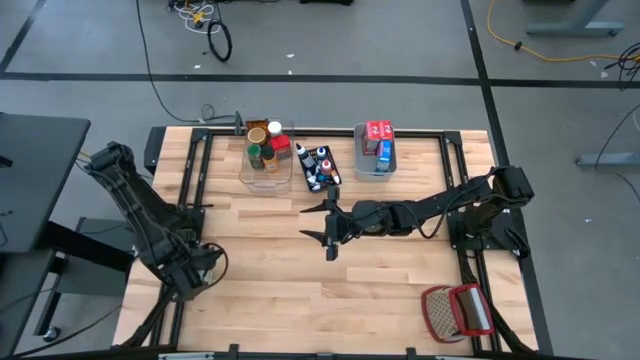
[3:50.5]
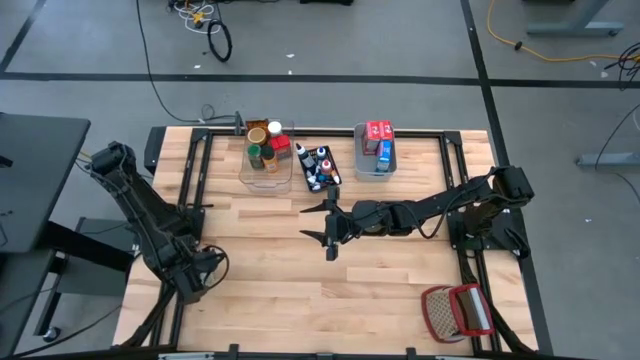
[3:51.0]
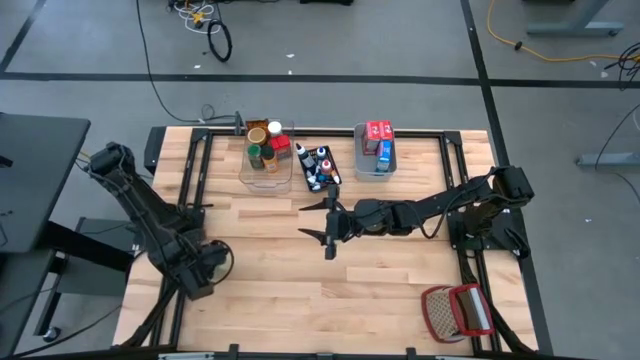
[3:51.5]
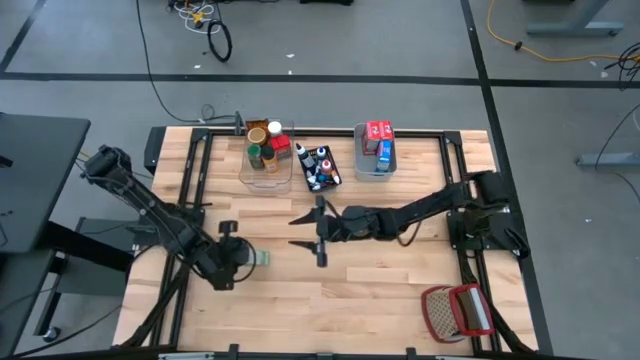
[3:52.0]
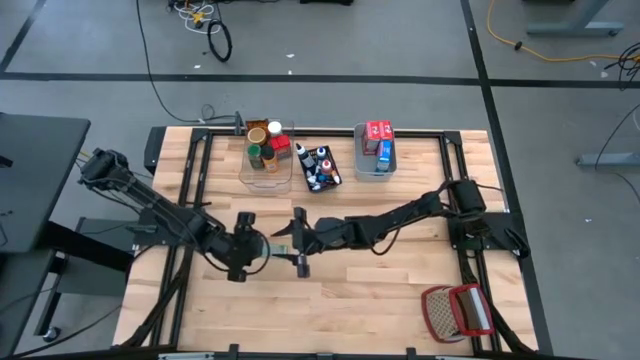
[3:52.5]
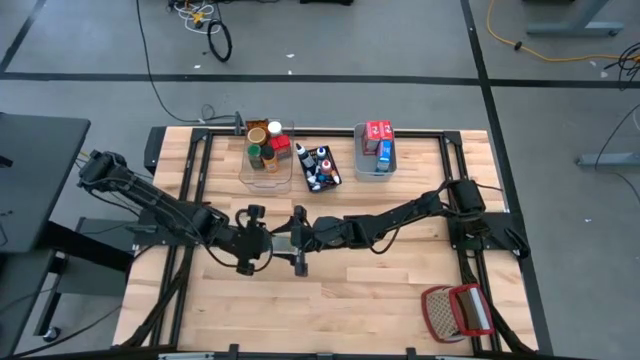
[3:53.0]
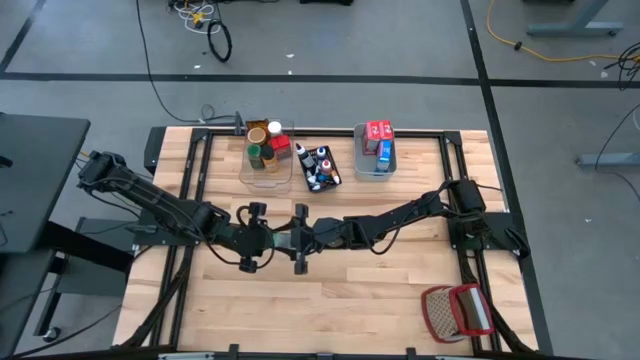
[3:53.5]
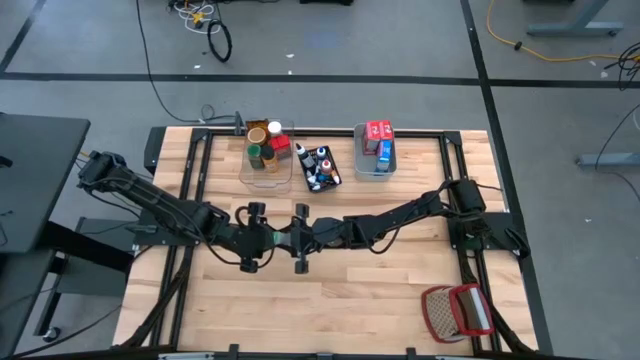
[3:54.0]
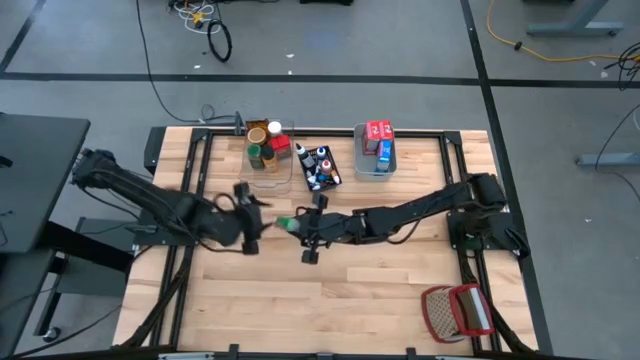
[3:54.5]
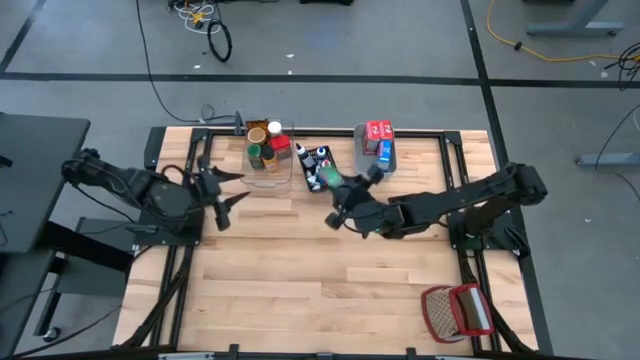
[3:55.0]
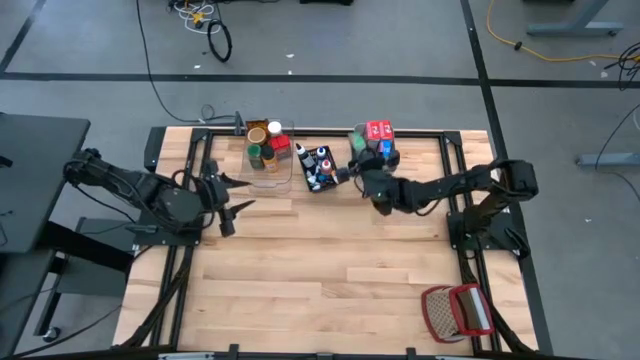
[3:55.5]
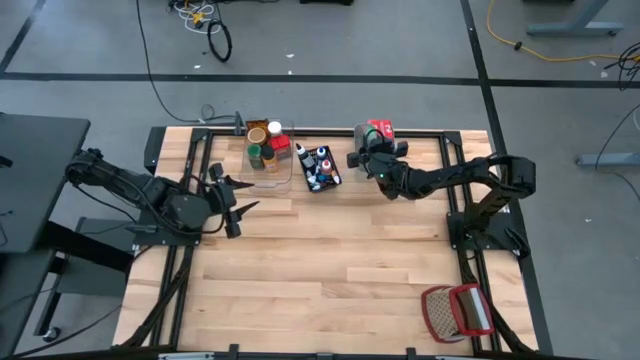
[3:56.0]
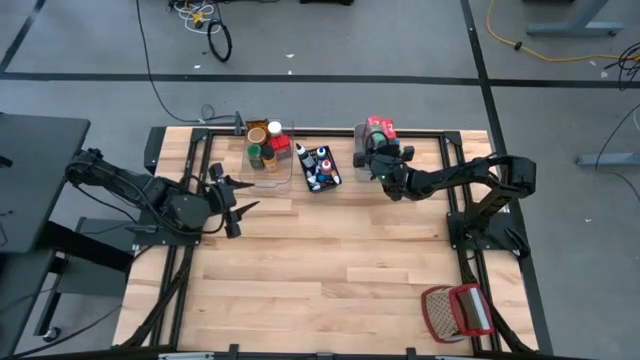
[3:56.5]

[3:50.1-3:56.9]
Task: Pick & Place Kitchen Items
Put the green cereal box into the gray bin

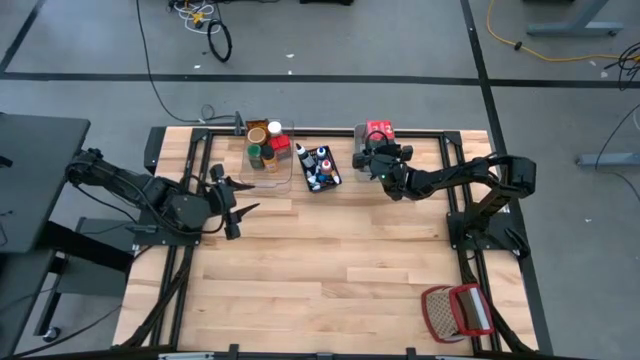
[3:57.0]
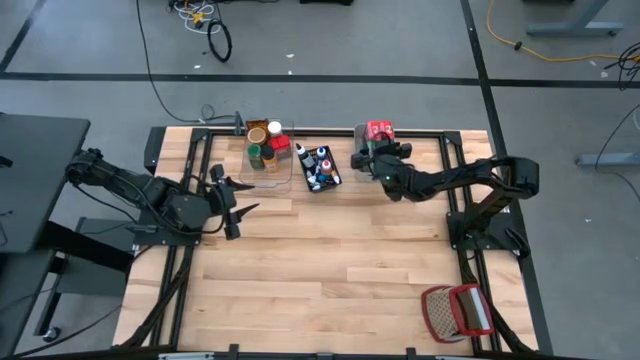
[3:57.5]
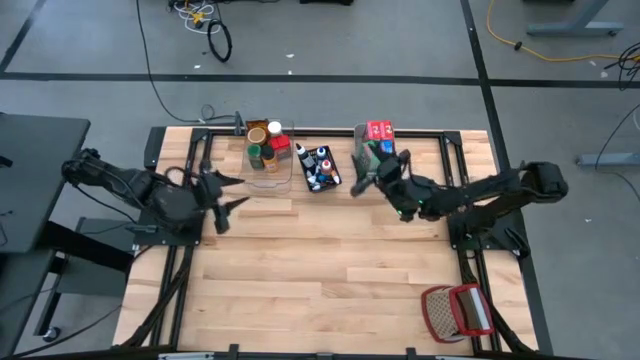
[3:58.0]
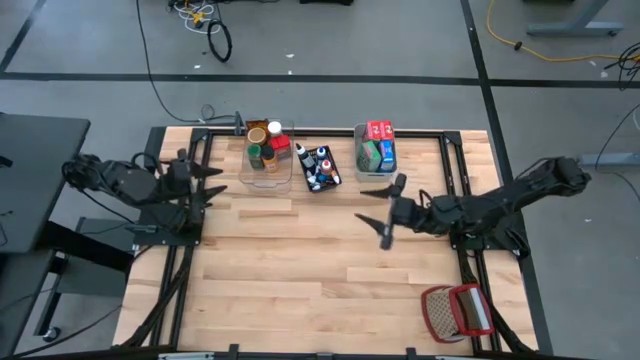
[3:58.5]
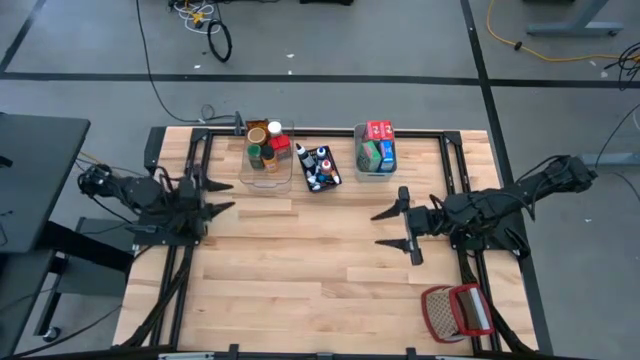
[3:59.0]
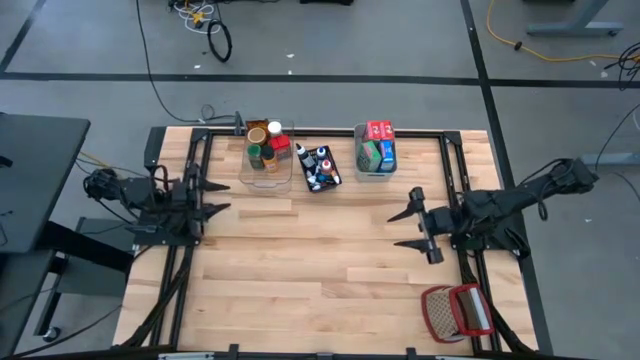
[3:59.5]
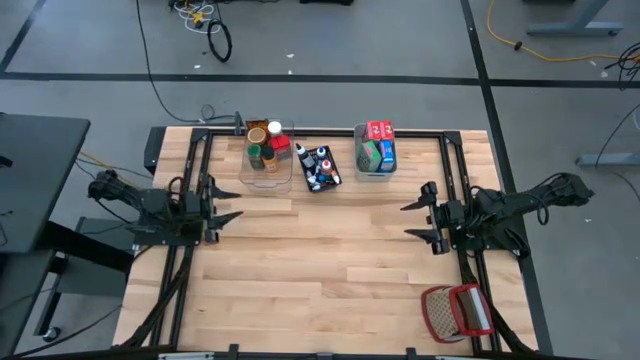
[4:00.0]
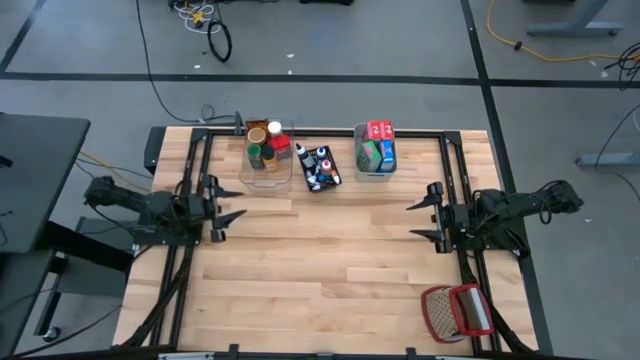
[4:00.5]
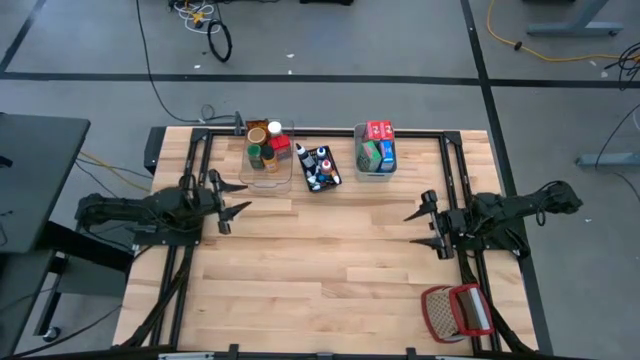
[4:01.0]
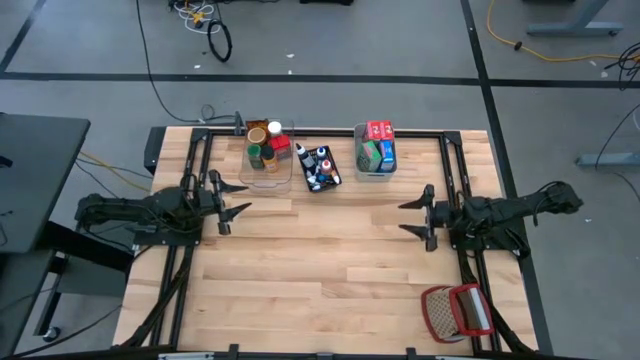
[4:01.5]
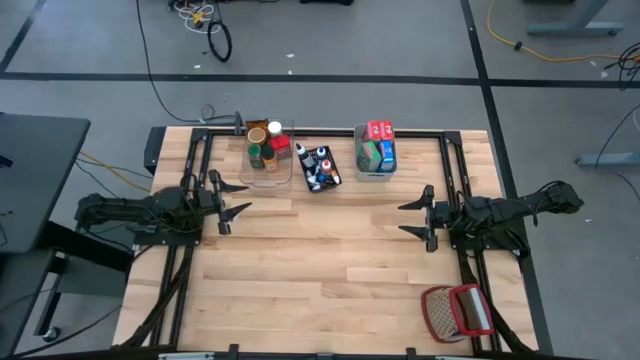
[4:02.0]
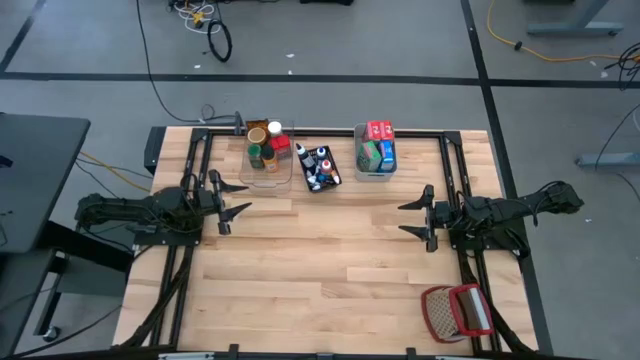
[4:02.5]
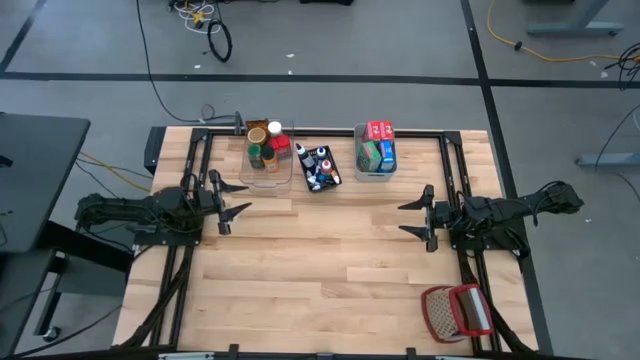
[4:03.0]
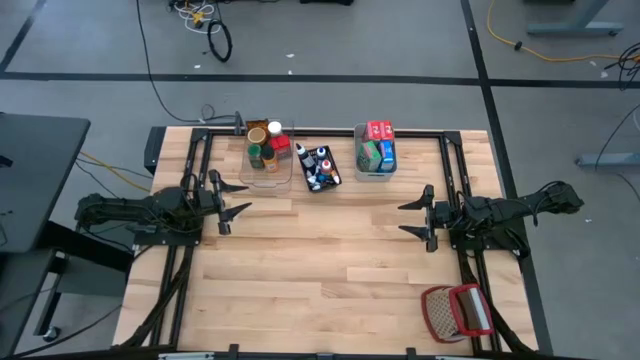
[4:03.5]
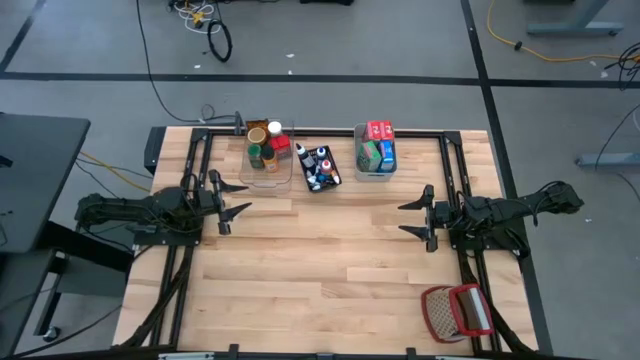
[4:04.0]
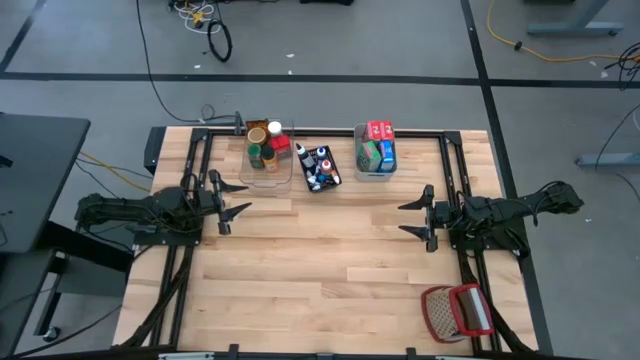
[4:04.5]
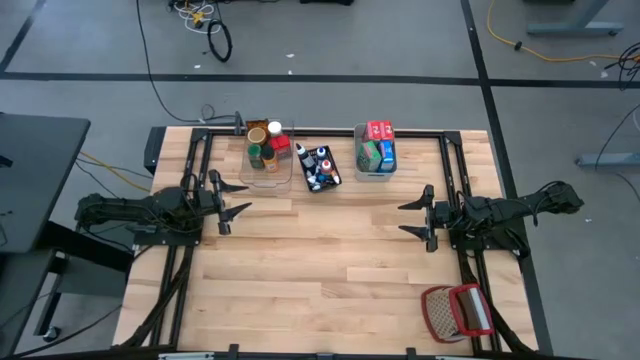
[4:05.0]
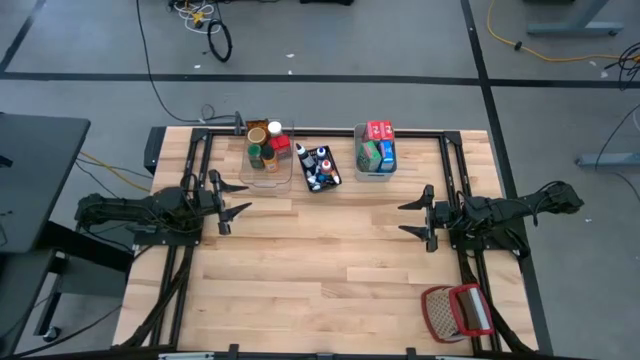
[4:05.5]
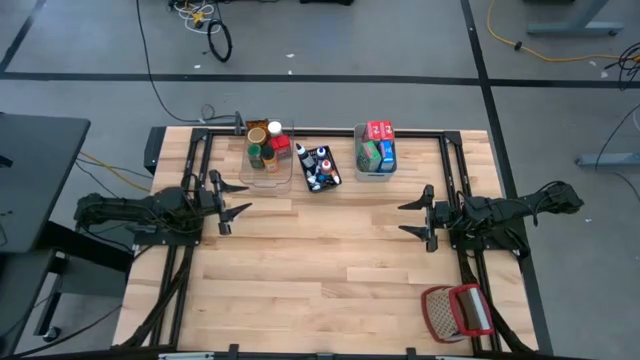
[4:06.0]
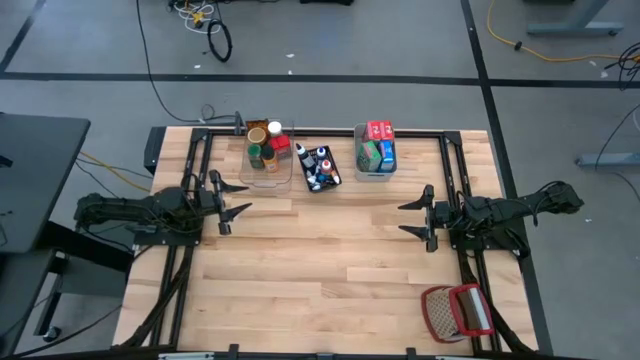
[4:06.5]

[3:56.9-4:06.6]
Return to Home Position

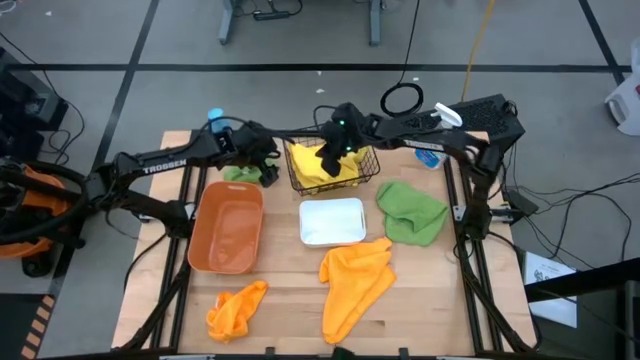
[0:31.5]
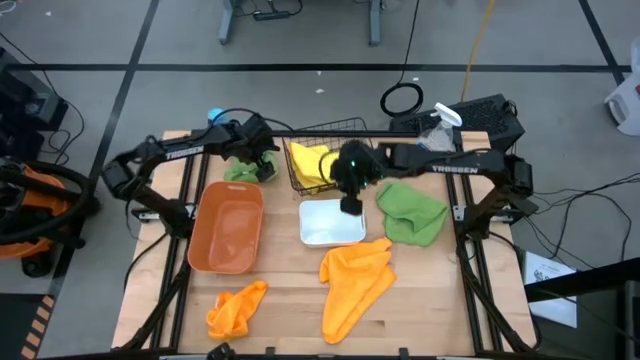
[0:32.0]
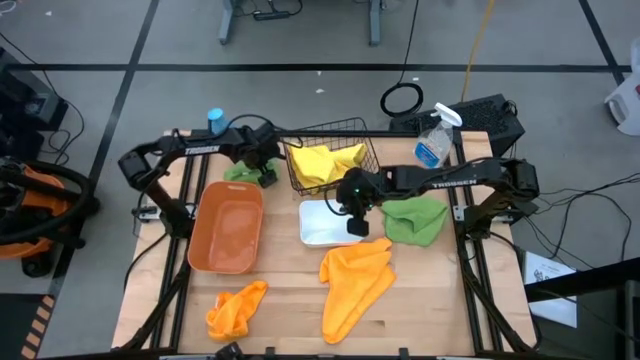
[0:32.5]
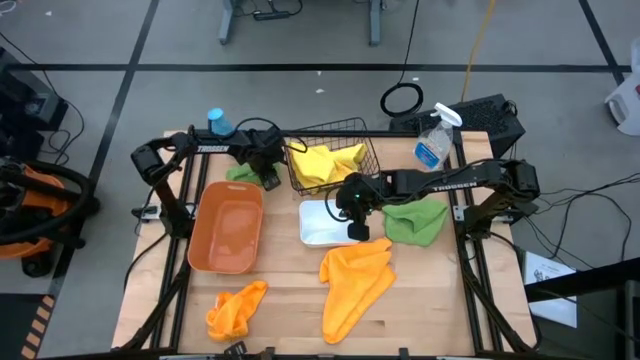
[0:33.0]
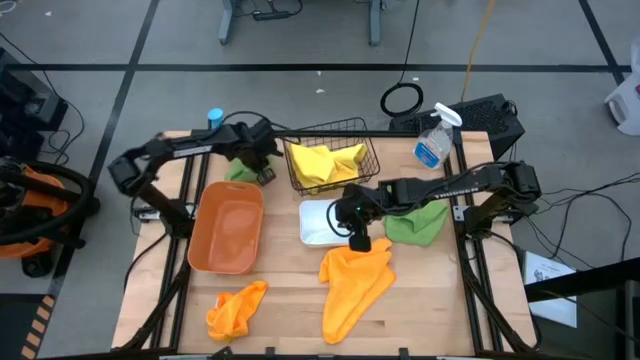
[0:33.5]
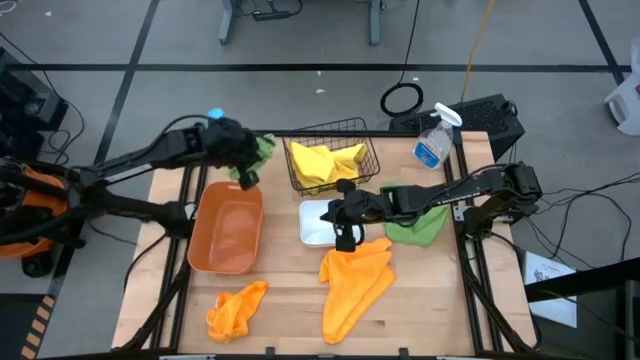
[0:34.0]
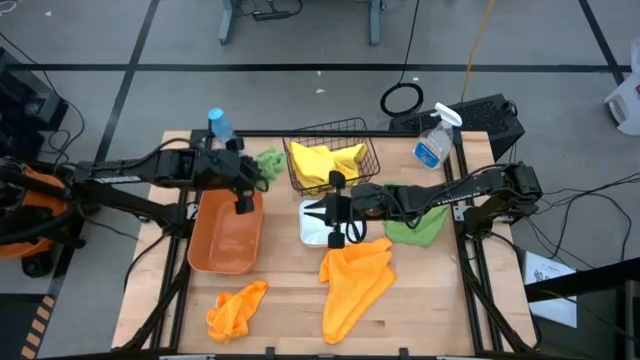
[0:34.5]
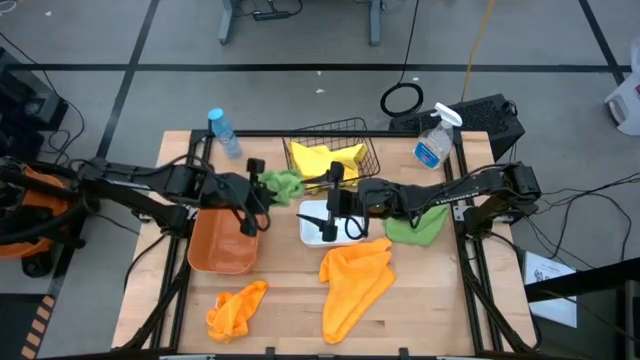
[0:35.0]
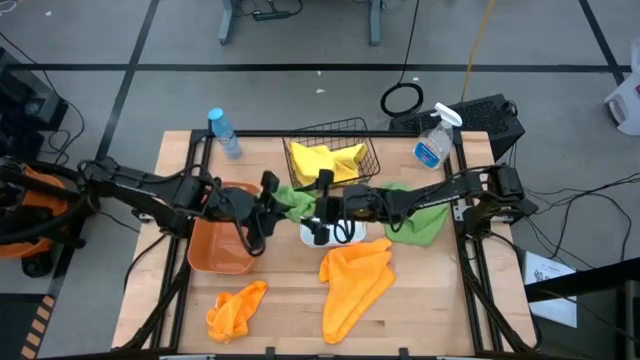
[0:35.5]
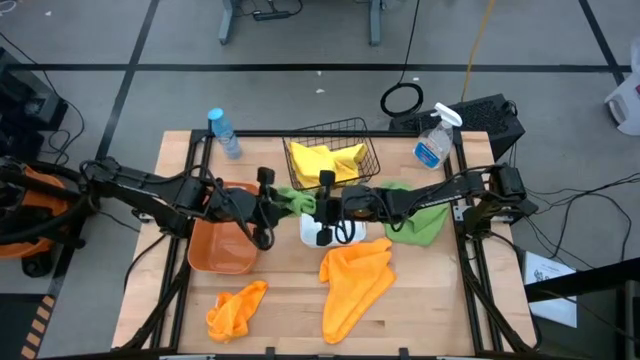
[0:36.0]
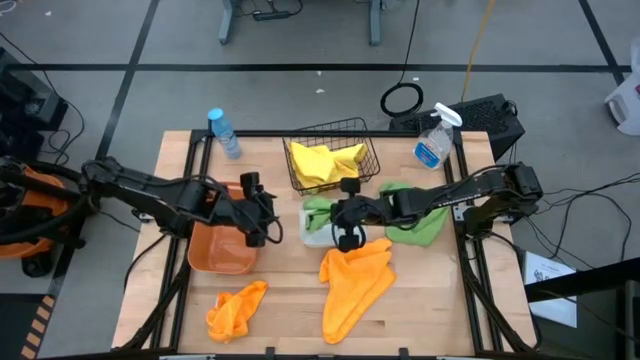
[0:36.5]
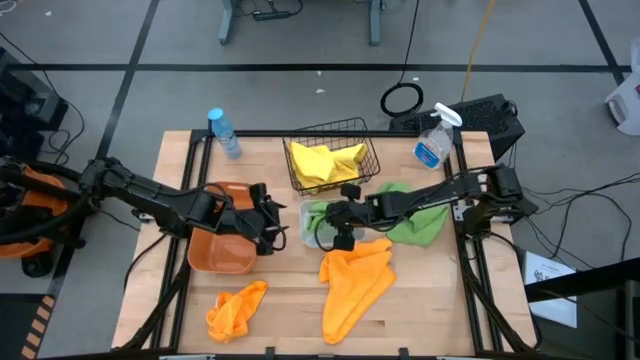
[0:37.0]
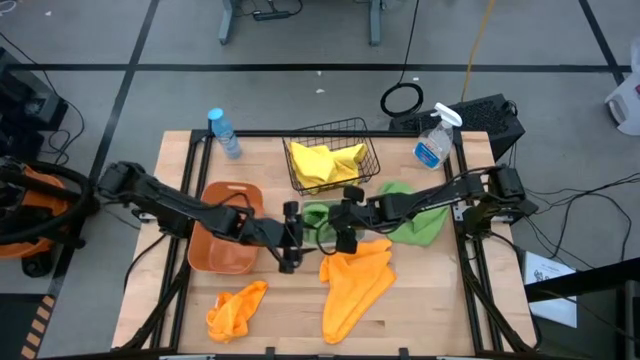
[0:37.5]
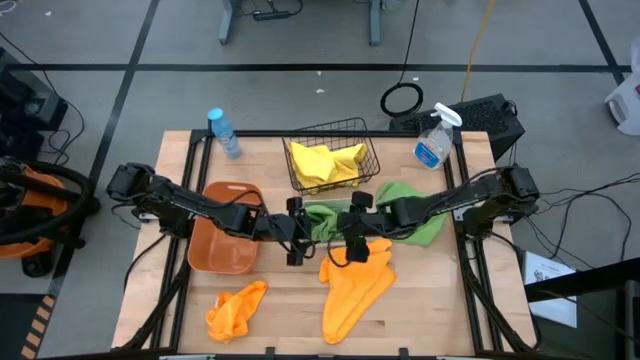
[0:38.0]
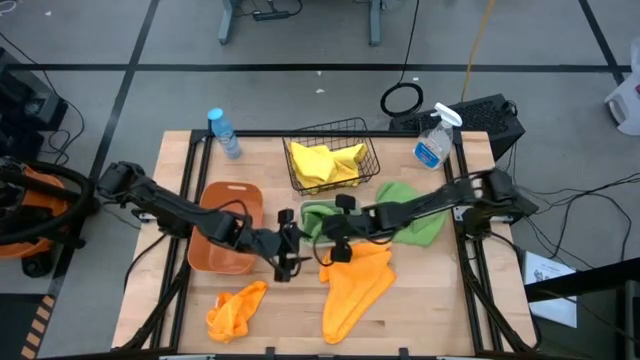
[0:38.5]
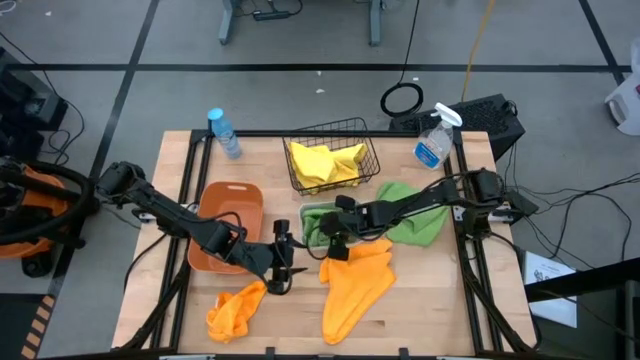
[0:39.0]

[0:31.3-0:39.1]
Task: Sort microfiber towel by color & place in baskets
Put the top green towel into the white bin
